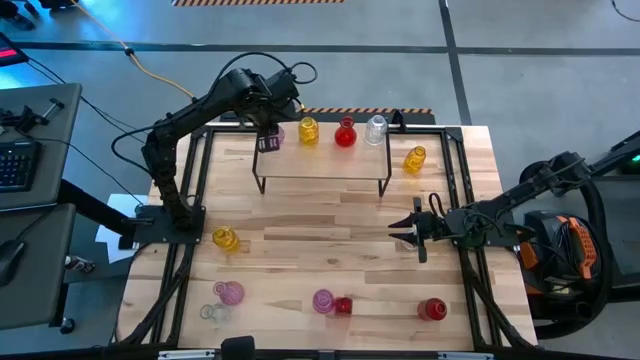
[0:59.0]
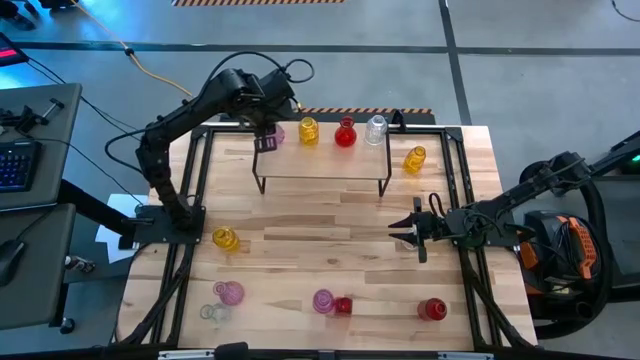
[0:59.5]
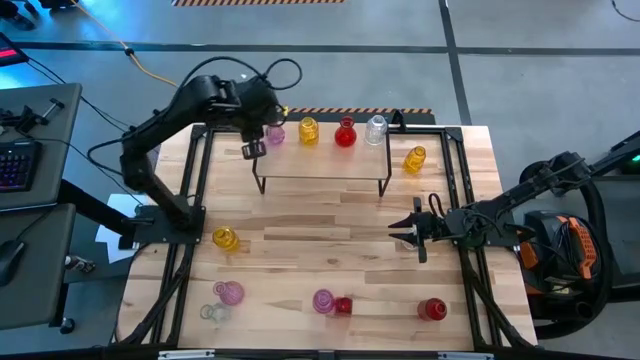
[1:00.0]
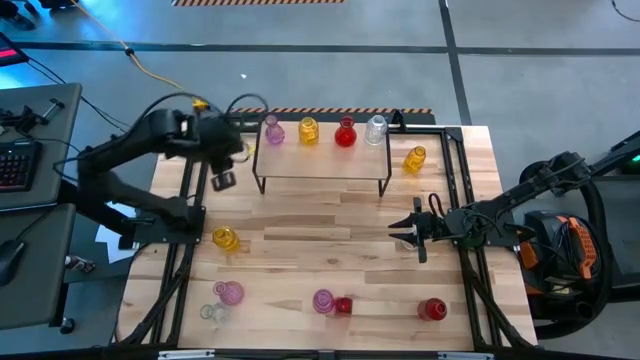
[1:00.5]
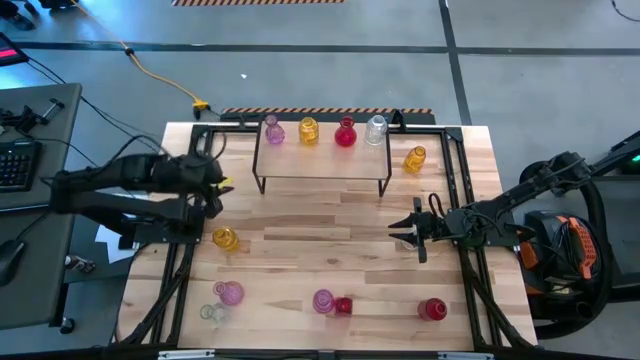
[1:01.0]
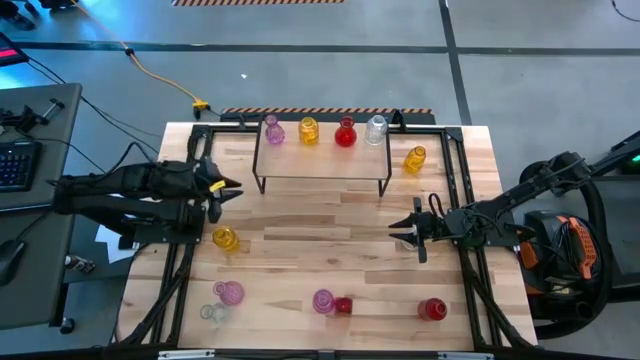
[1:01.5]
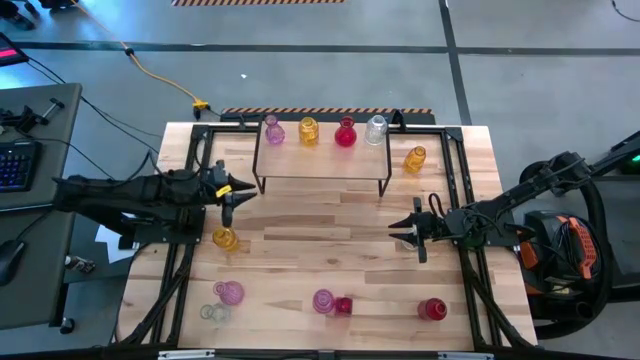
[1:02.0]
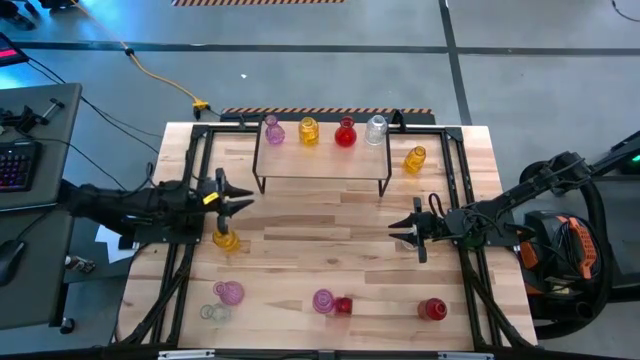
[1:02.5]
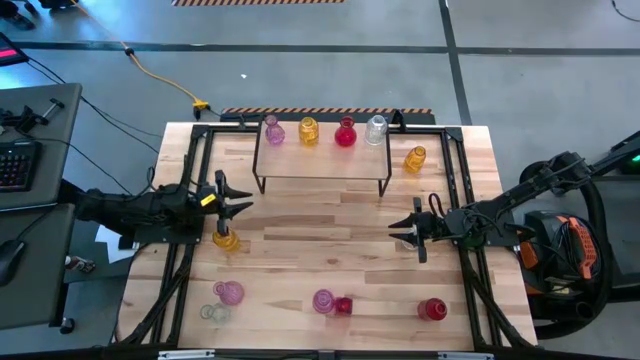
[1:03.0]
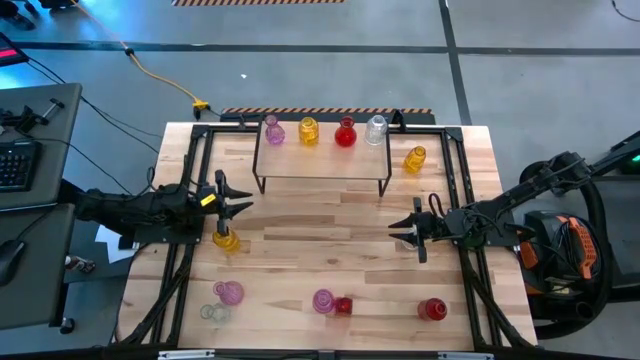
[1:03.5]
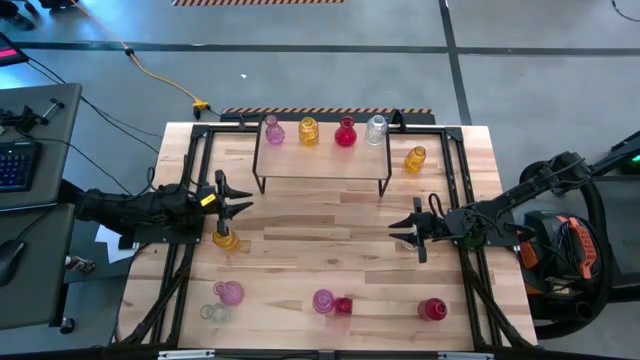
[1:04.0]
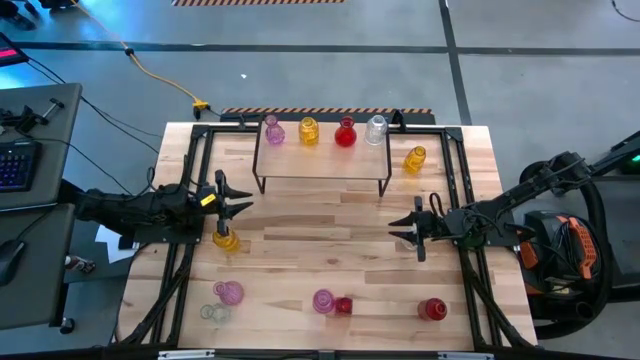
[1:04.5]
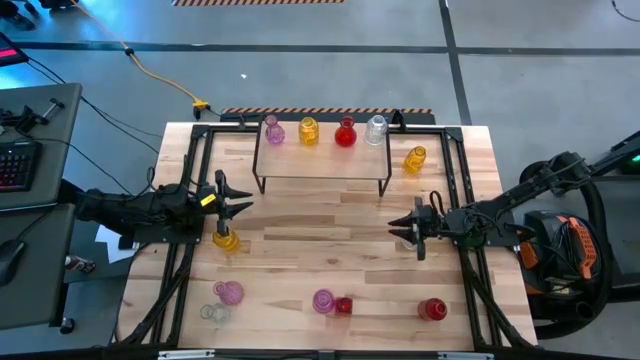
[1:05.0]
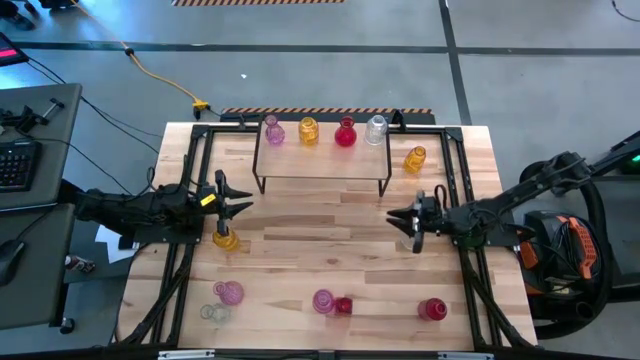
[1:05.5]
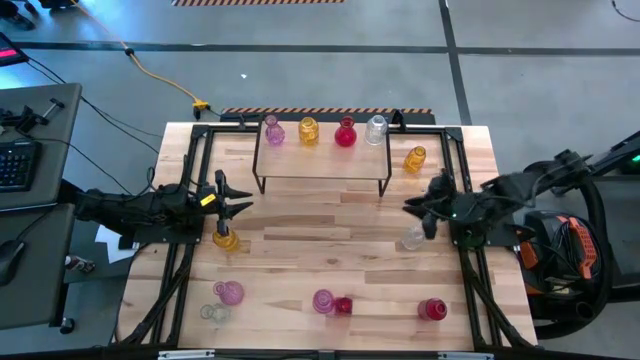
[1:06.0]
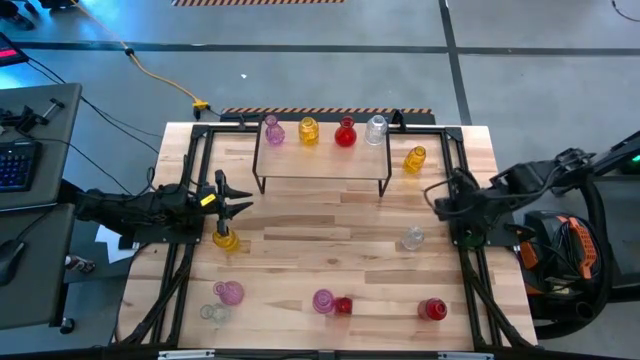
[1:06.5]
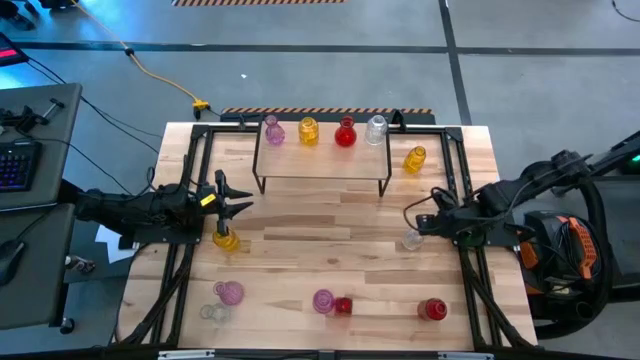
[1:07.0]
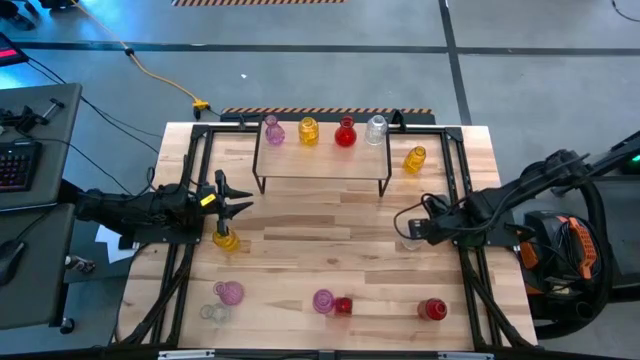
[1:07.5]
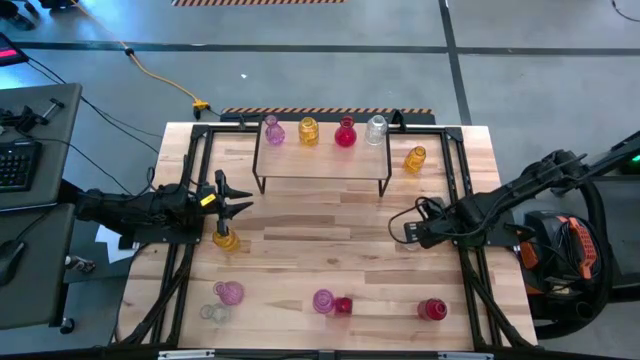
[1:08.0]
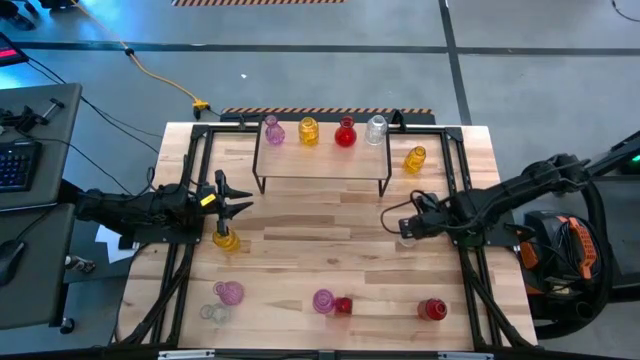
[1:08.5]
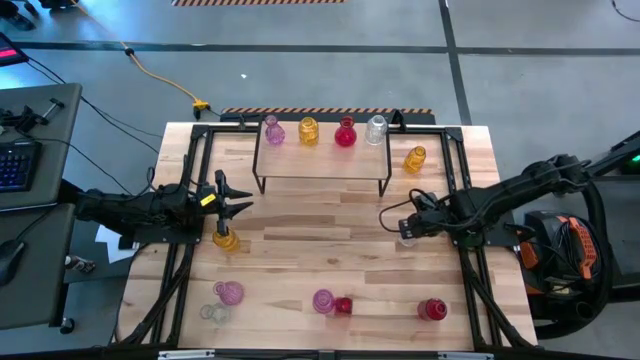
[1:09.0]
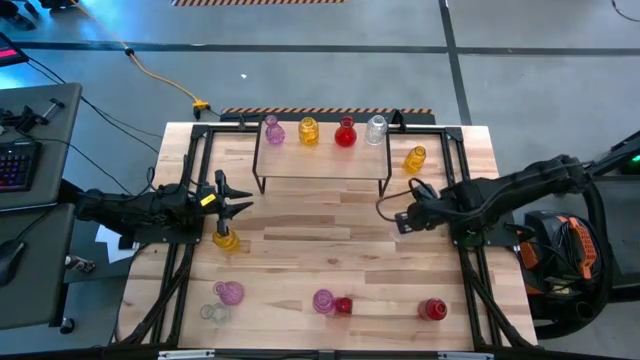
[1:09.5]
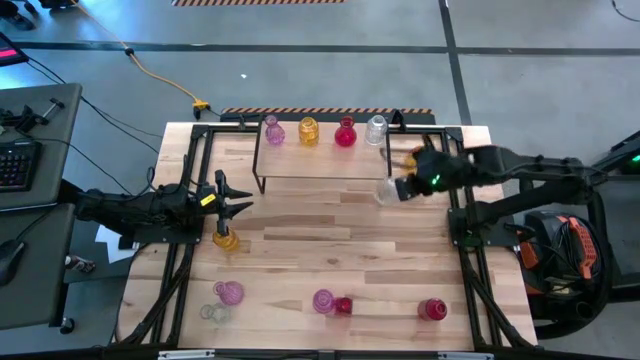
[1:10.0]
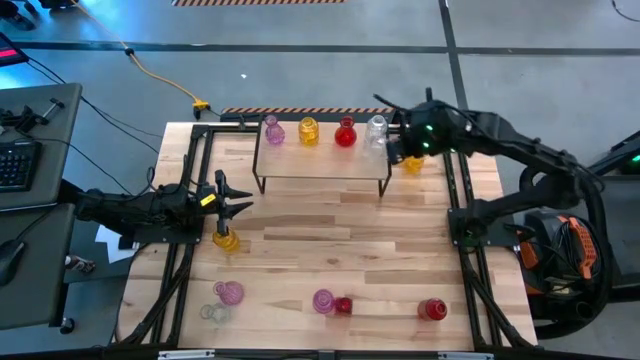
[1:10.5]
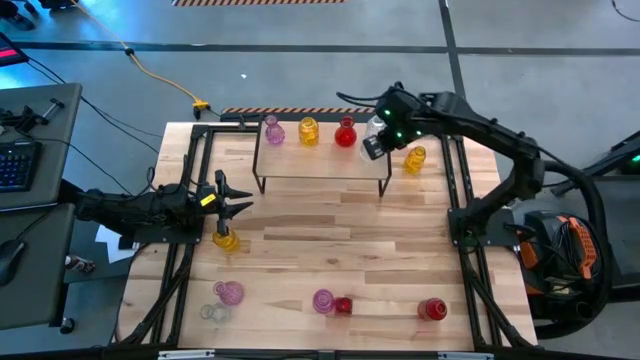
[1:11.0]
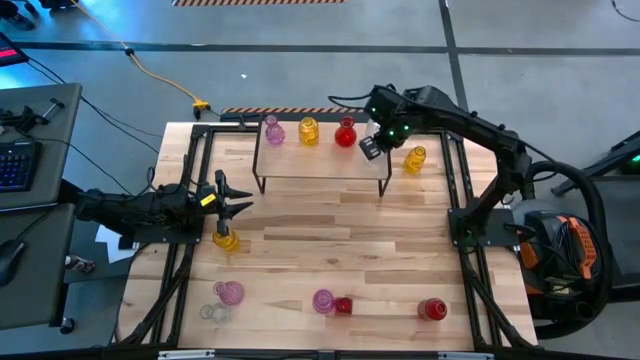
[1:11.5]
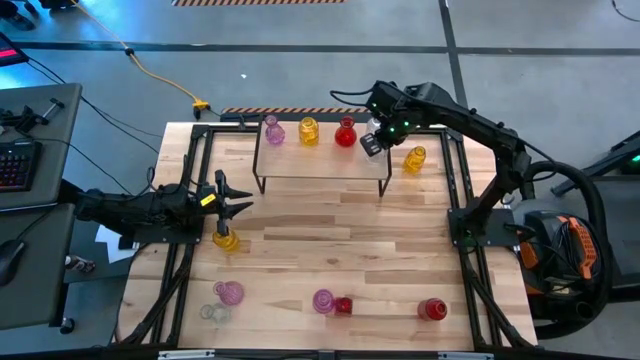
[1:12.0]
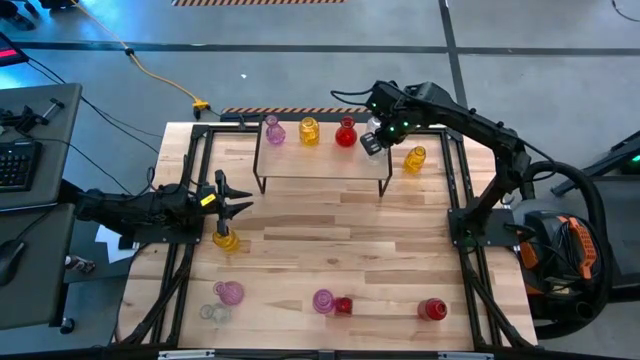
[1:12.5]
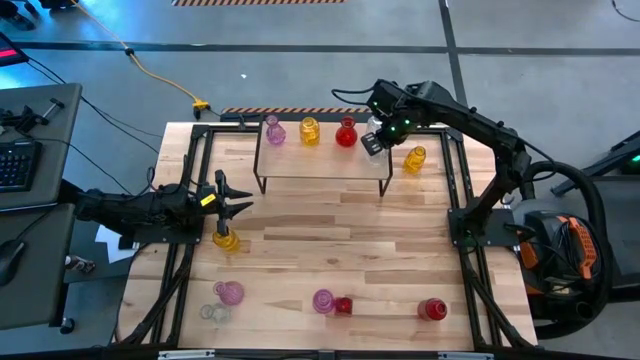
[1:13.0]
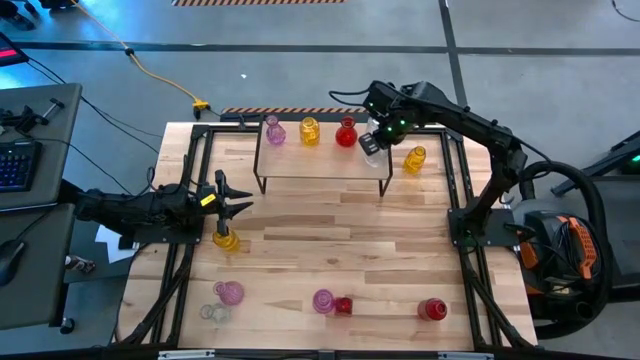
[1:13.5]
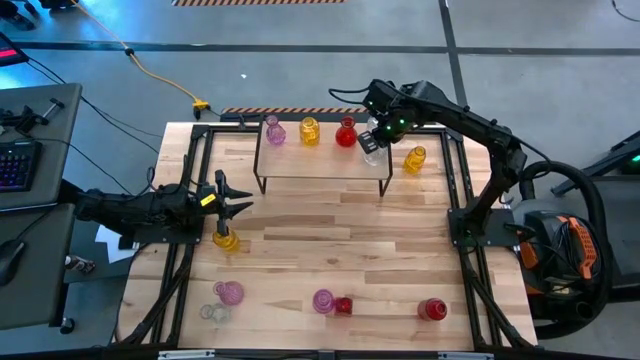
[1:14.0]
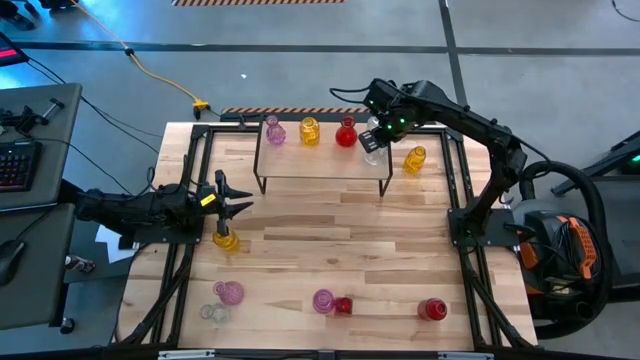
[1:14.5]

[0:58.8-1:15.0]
Task: sort vases onto shelf
Put the top transparent vase on the shelf aligned with the other transparent vase

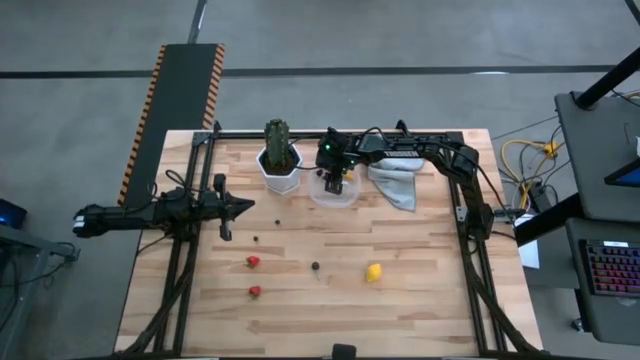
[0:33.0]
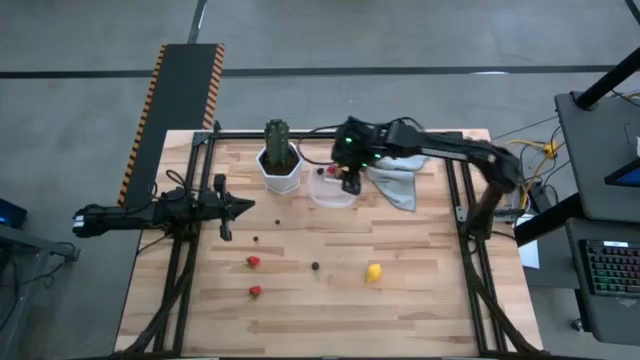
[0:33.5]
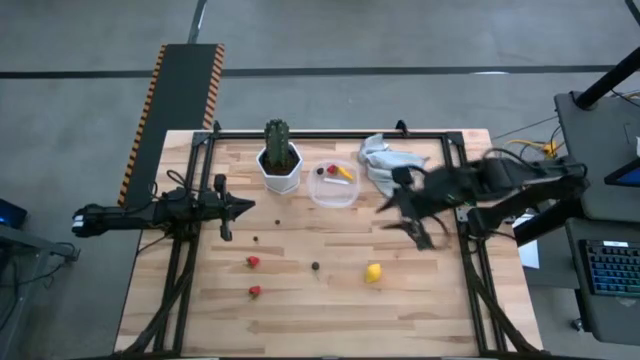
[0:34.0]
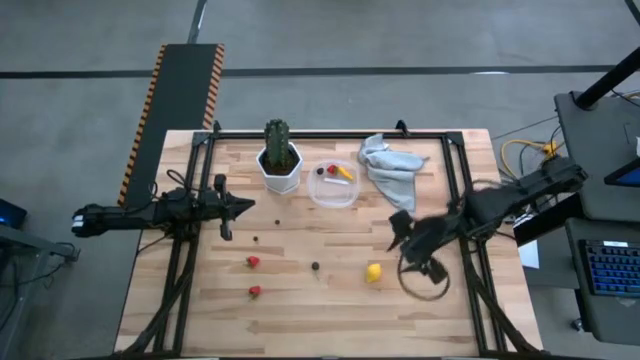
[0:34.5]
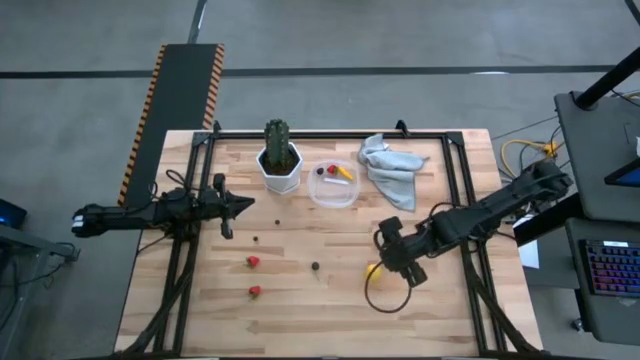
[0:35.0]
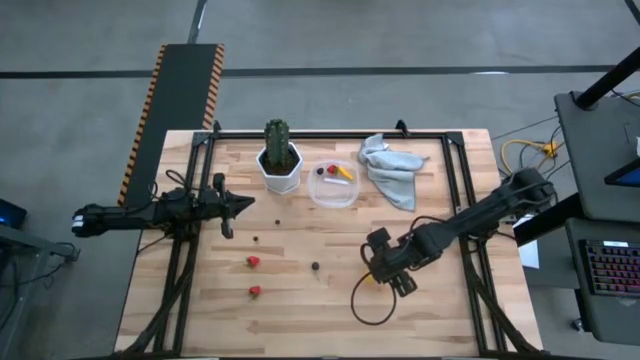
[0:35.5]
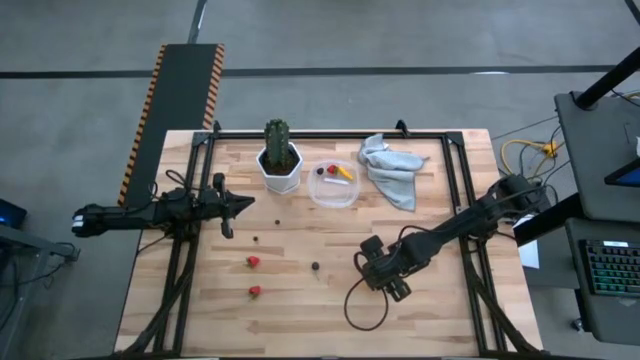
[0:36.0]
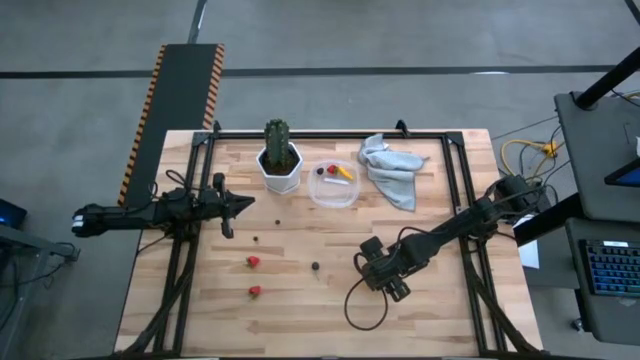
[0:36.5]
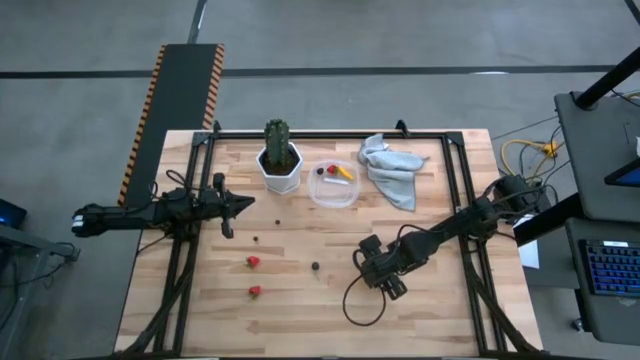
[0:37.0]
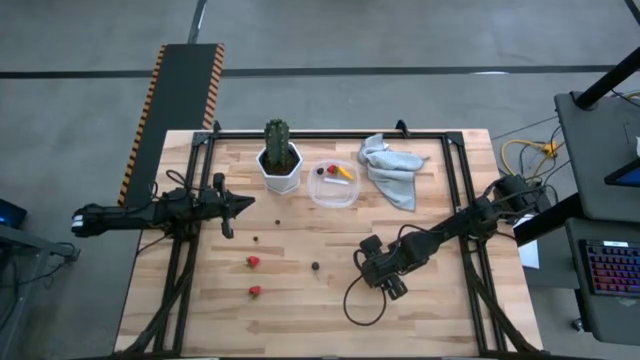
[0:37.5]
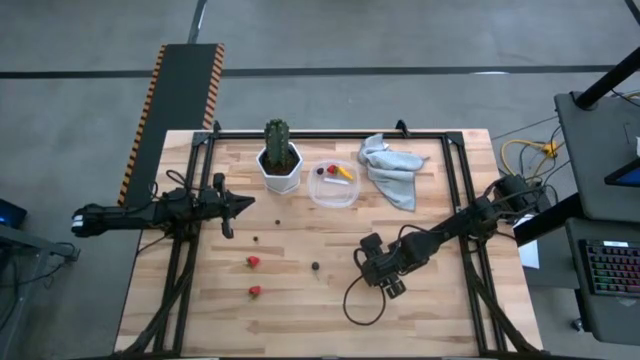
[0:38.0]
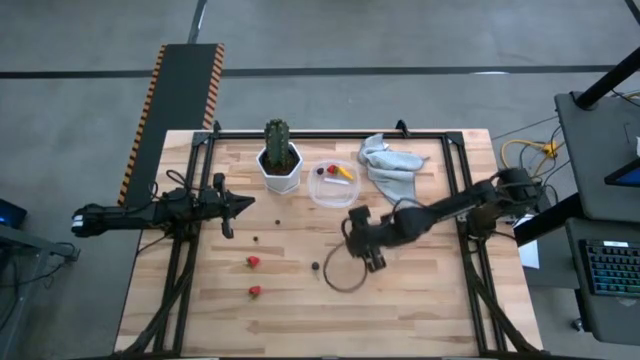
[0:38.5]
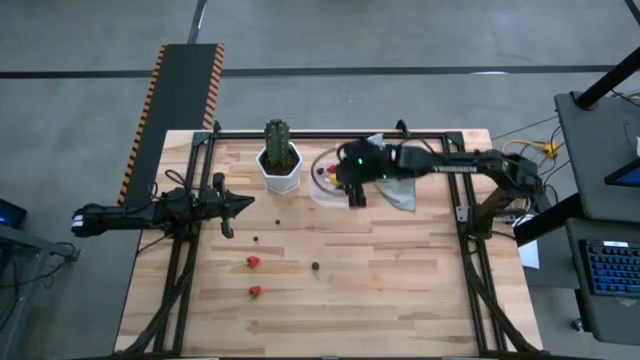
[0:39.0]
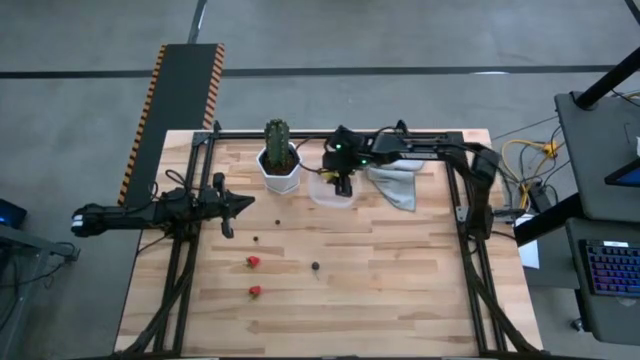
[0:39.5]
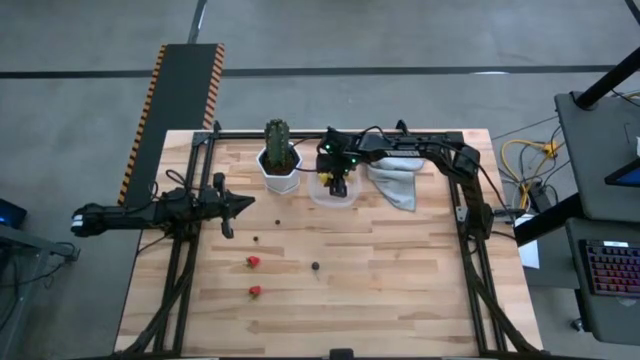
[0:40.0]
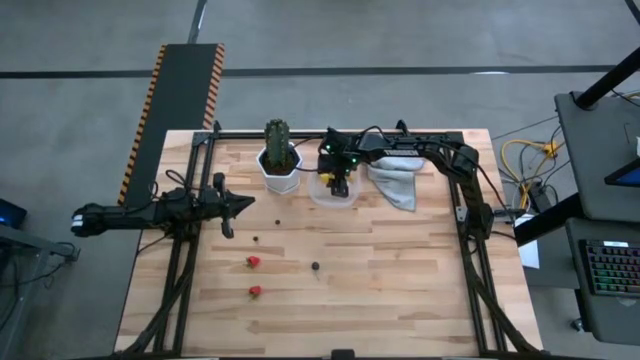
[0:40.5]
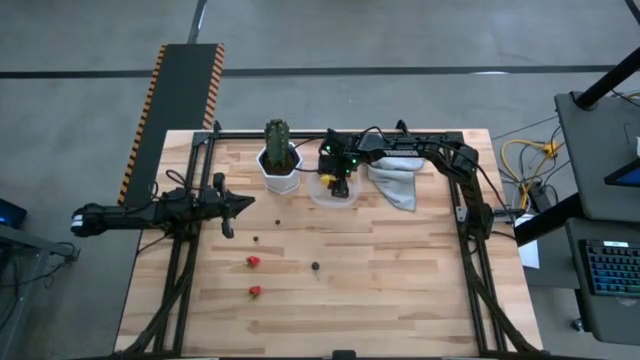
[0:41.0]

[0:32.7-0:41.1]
Task: Pick and placing Produce into tupperware
Put the yellow lemon into the transparent bin
